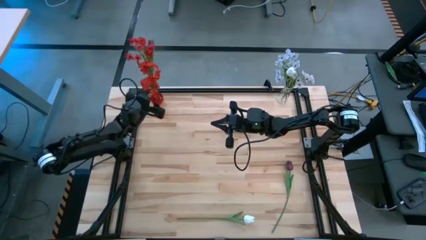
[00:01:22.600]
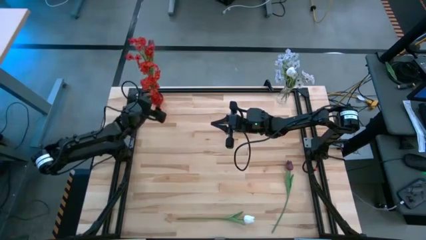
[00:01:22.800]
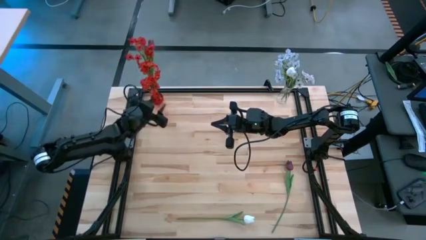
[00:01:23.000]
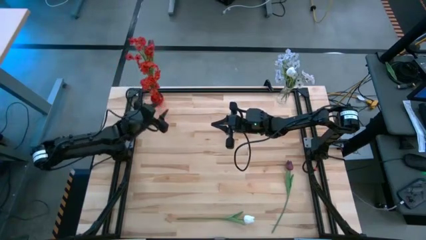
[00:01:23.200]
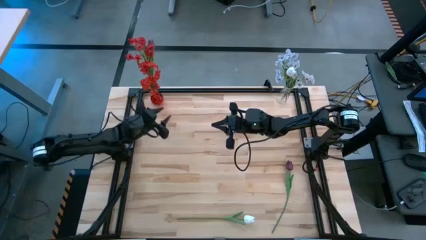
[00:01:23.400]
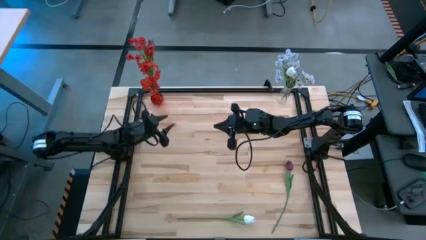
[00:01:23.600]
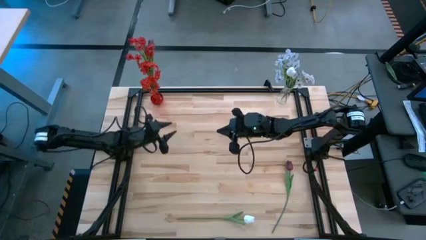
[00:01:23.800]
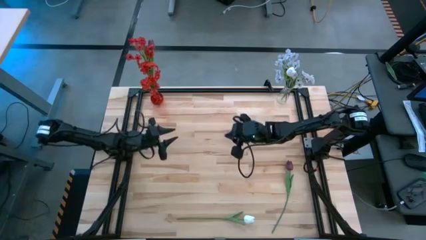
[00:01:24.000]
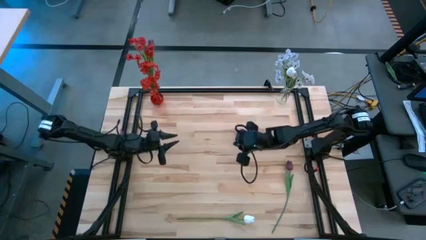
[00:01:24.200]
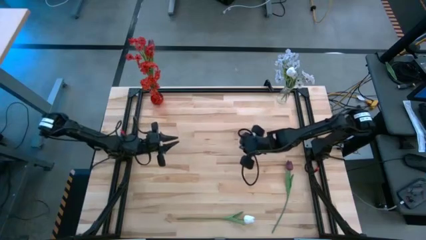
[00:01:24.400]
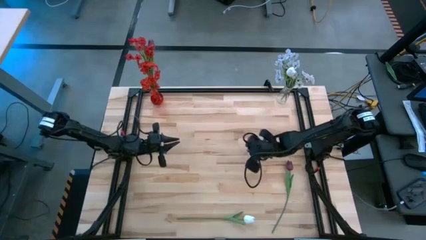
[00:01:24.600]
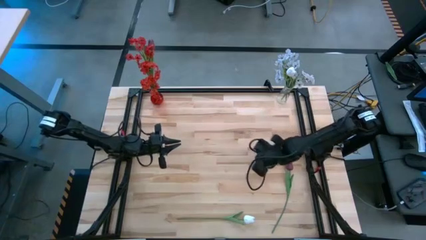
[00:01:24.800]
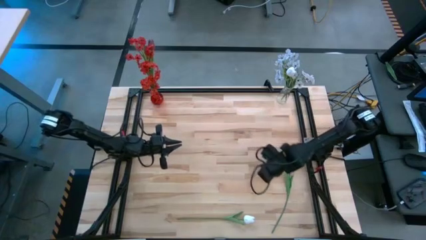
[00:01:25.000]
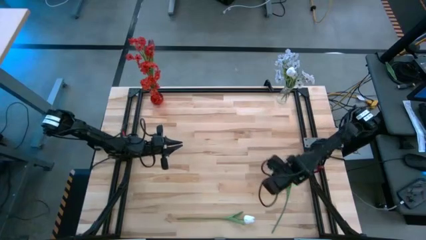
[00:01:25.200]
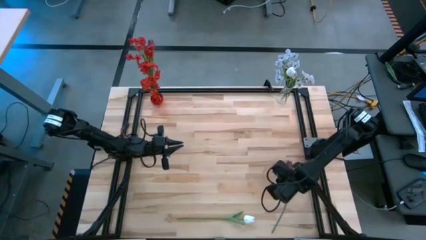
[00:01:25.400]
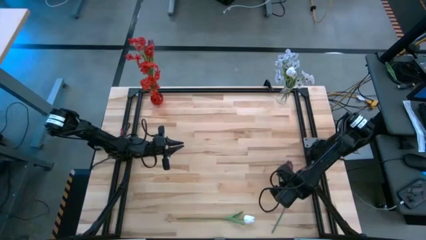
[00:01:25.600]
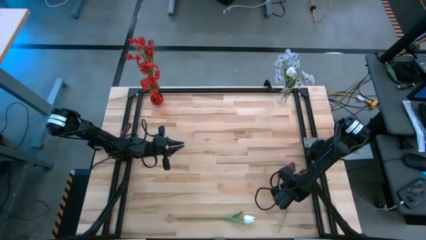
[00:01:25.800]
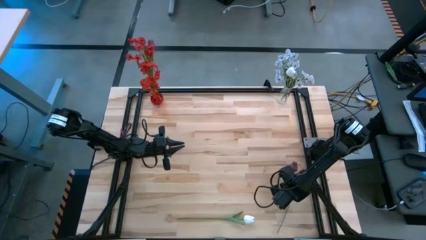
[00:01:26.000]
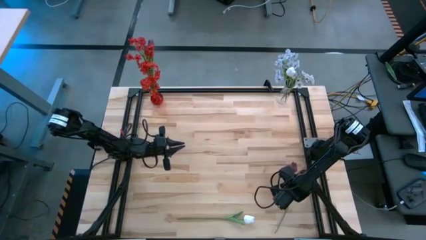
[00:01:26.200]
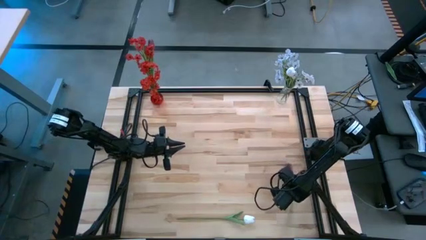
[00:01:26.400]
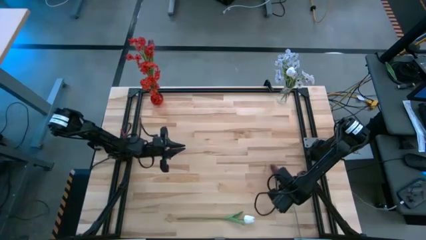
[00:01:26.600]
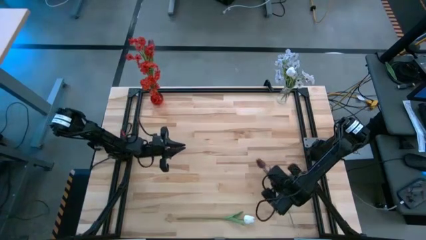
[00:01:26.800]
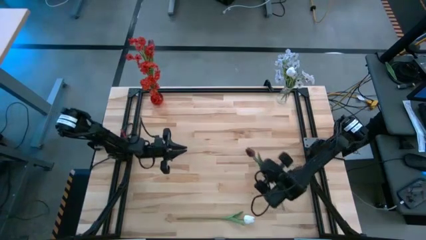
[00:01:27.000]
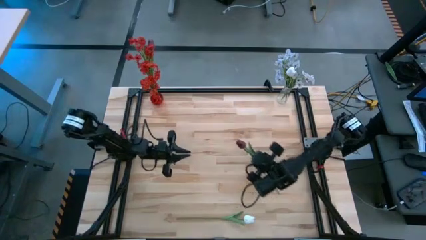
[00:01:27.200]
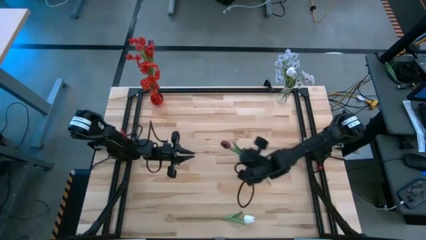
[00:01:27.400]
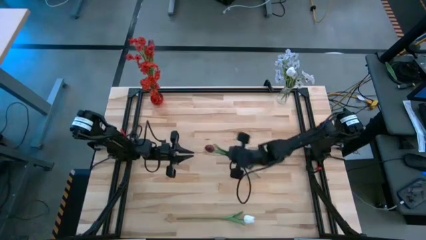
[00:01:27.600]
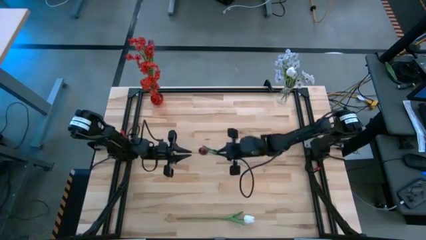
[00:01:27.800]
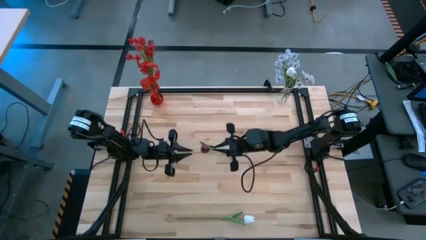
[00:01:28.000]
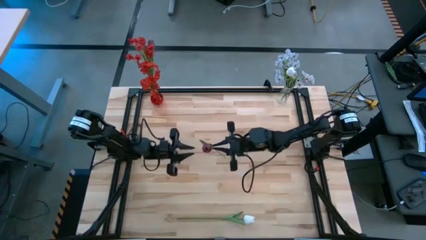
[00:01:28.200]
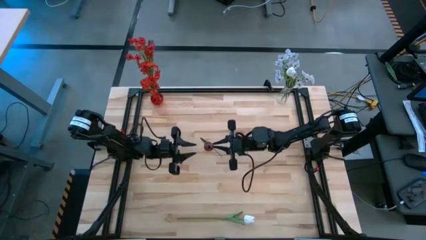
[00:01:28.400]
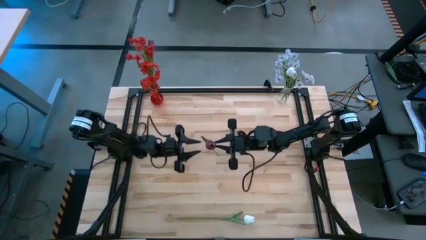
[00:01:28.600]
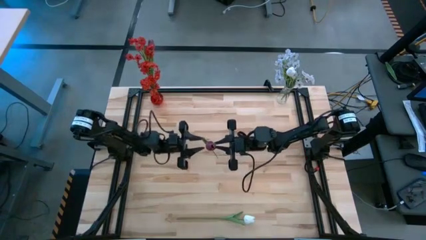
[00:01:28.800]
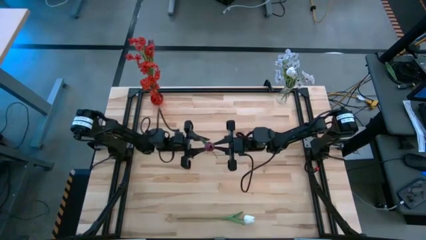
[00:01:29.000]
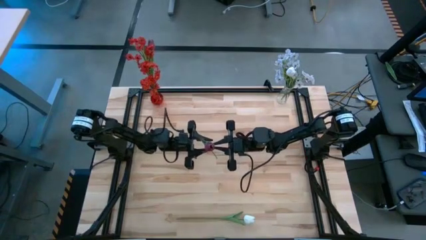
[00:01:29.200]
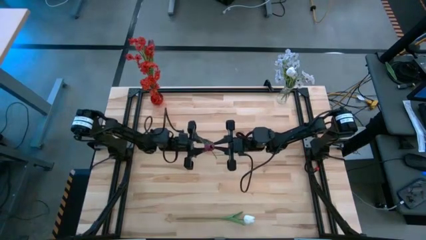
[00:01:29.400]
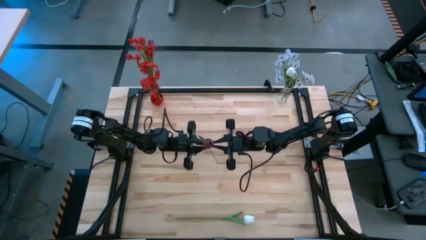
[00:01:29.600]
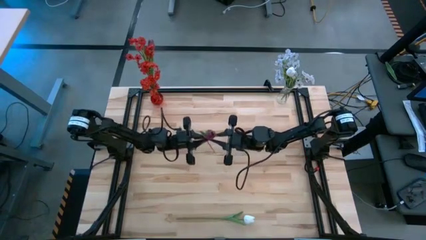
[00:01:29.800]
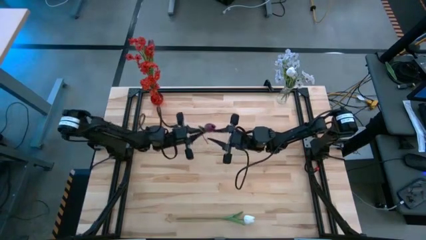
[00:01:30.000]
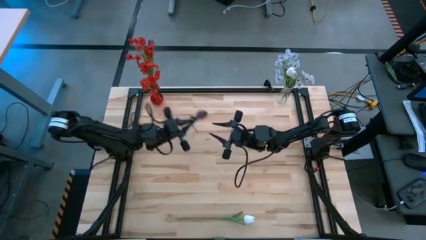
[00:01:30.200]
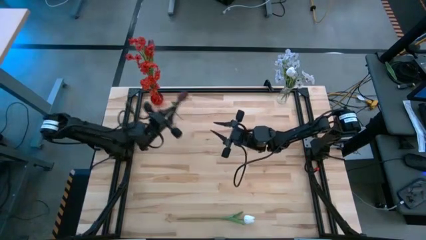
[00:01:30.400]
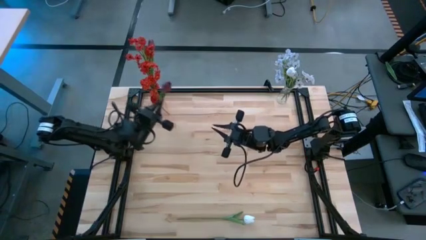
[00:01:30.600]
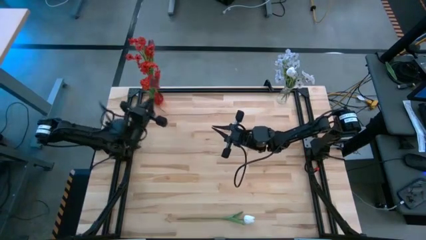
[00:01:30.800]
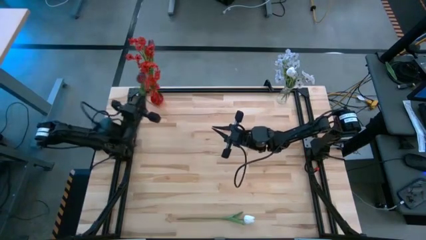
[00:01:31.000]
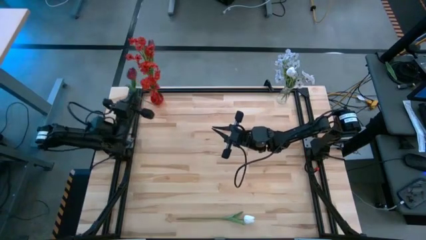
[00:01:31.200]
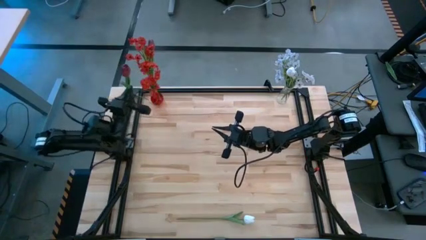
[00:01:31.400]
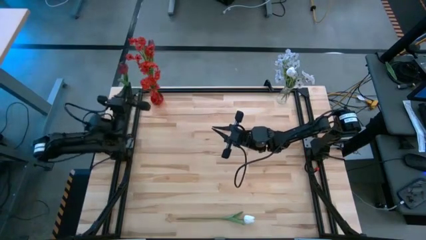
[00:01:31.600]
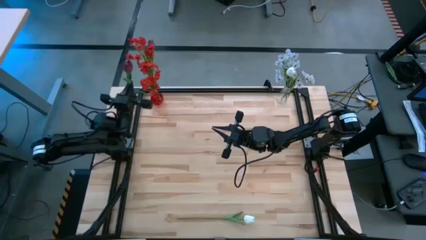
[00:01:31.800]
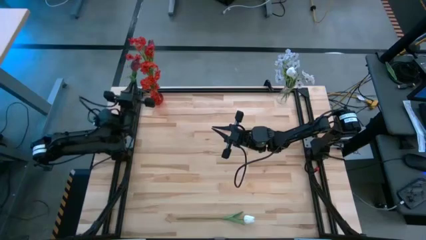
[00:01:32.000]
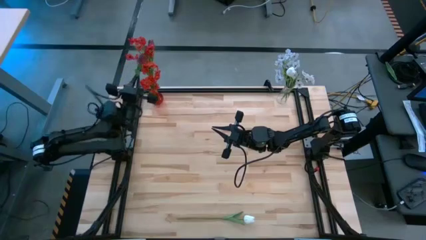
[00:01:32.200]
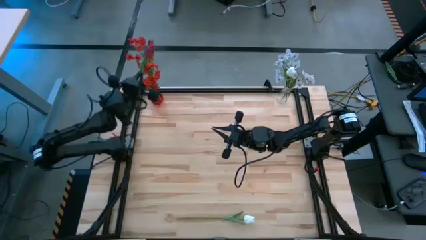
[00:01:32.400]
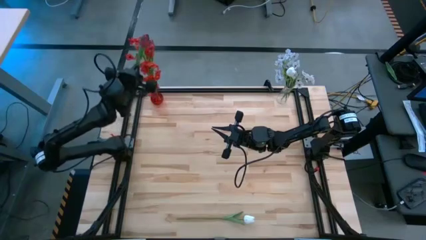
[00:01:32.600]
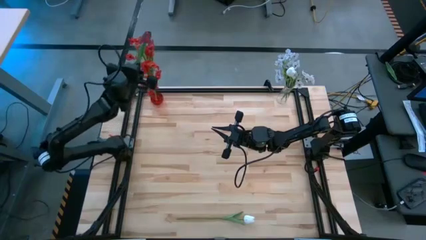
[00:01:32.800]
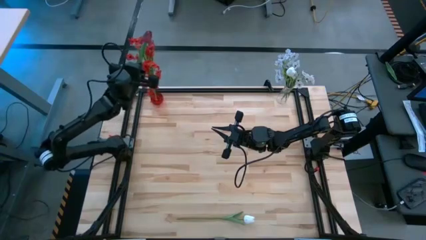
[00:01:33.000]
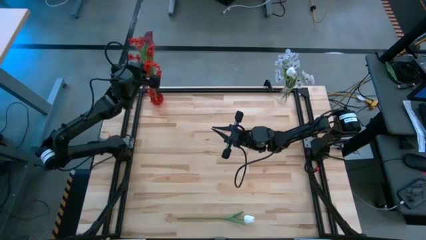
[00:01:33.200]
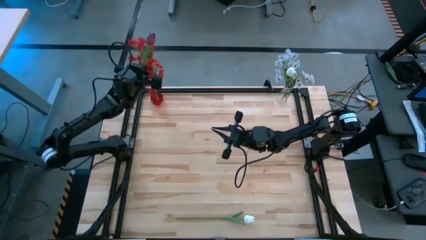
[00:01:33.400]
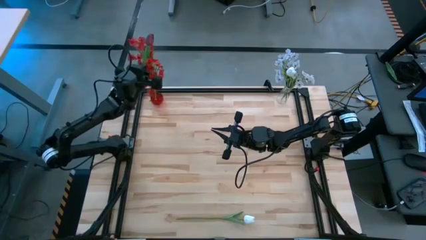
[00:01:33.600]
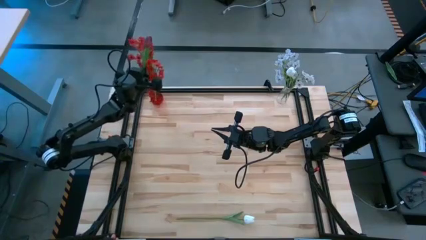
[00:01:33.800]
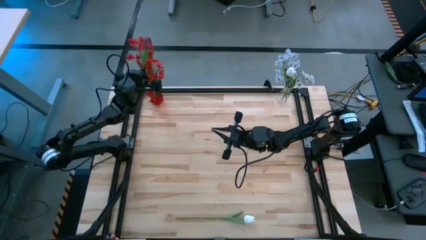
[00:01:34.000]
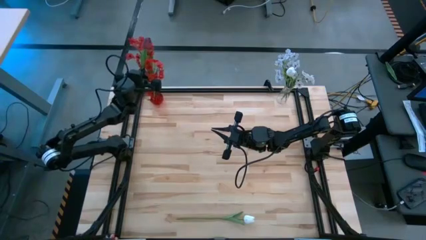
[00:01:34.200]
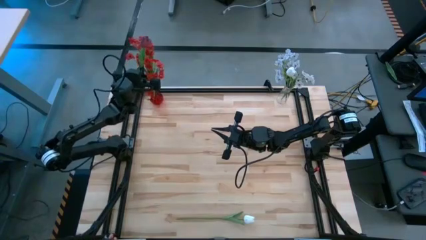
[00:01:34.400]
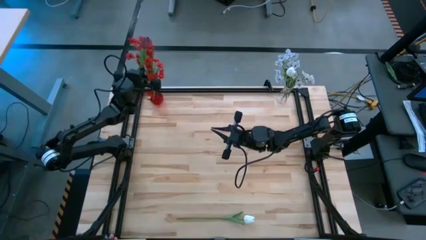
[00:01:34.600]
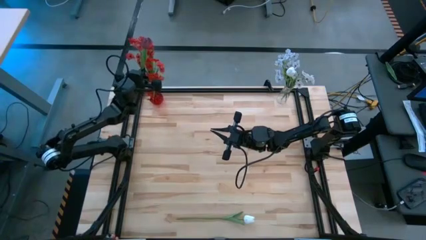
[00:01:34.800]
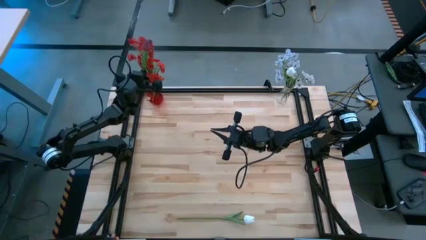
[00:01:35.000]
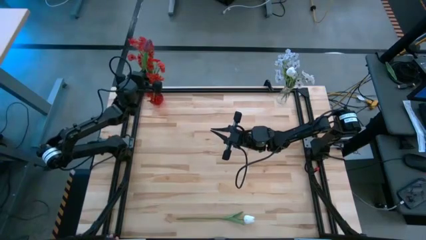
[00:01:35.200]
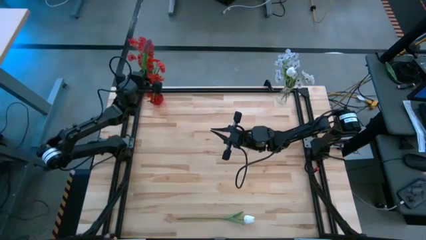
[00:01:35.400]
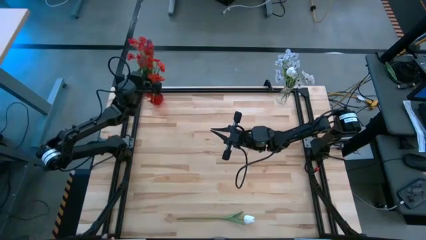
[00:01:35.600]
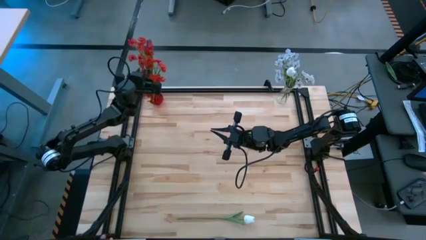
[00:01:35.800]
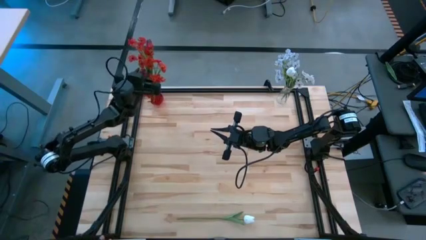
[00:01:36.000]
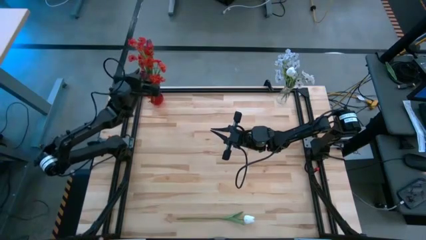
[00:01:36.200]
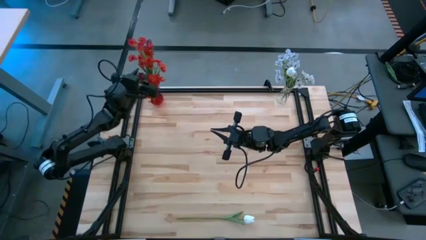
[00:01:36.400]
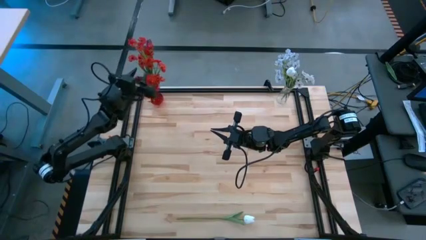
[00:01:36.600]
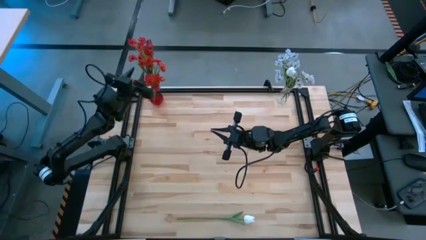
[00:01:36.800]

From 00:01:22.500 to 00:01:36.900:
Task: Sort flowers into vase by color
Put the dark red tulip into the red flower vase
